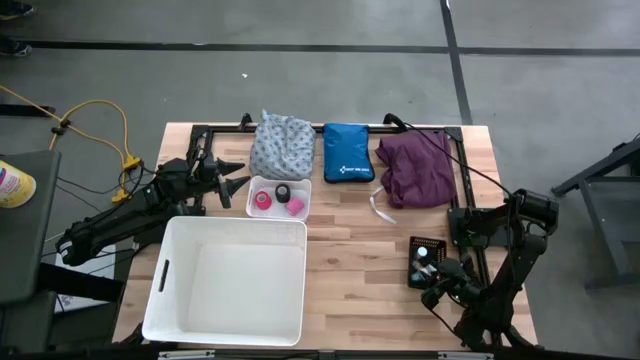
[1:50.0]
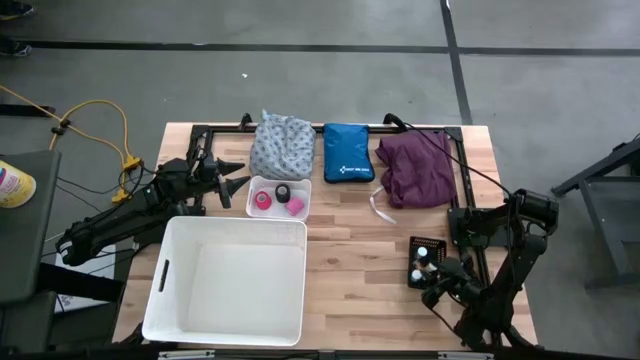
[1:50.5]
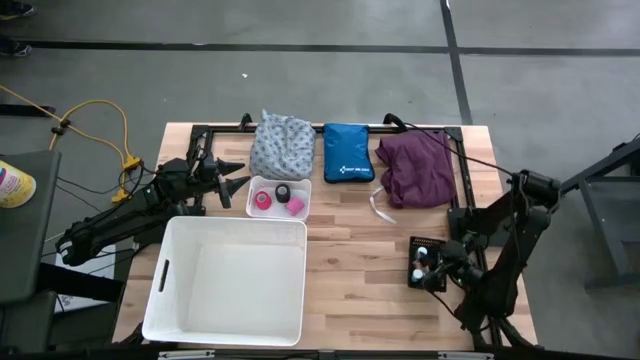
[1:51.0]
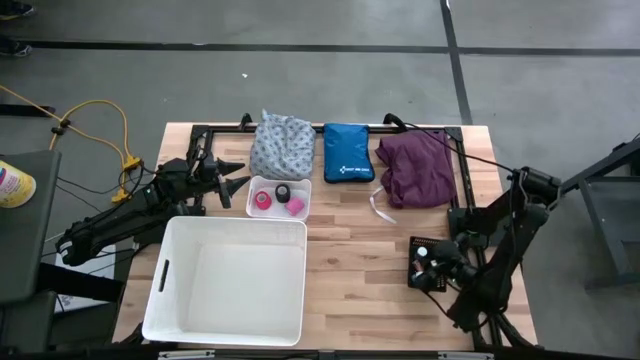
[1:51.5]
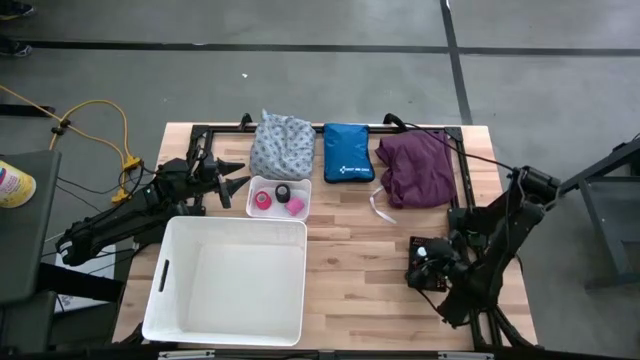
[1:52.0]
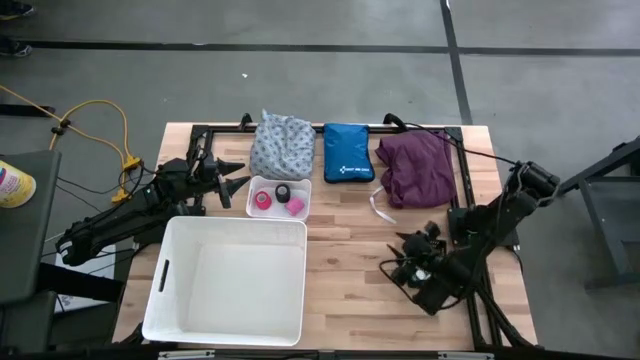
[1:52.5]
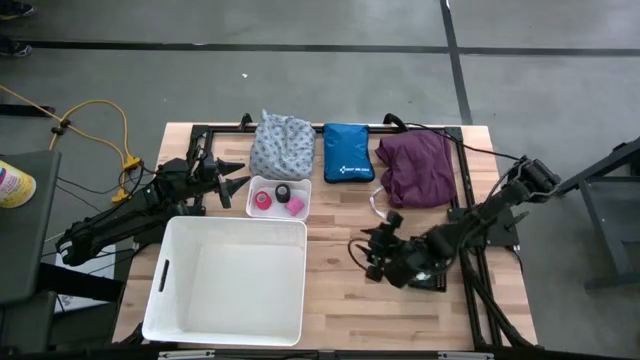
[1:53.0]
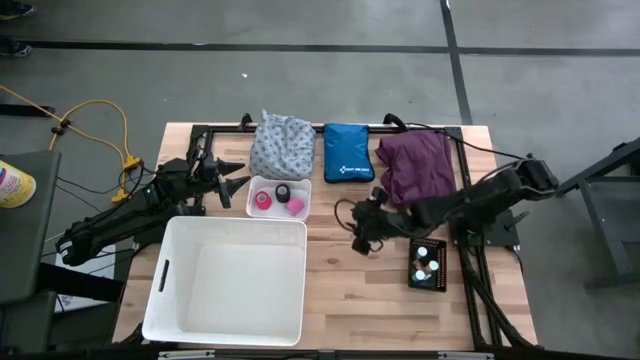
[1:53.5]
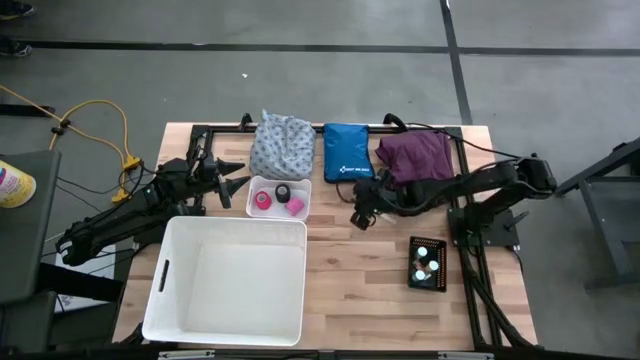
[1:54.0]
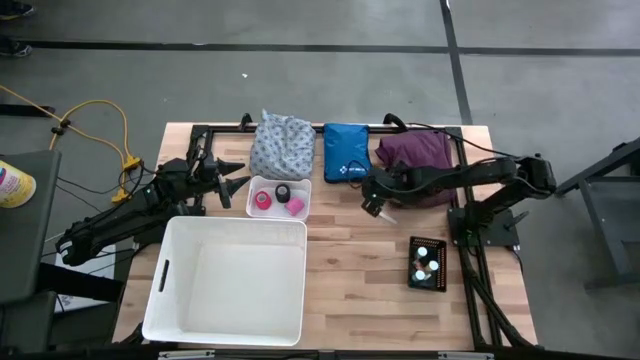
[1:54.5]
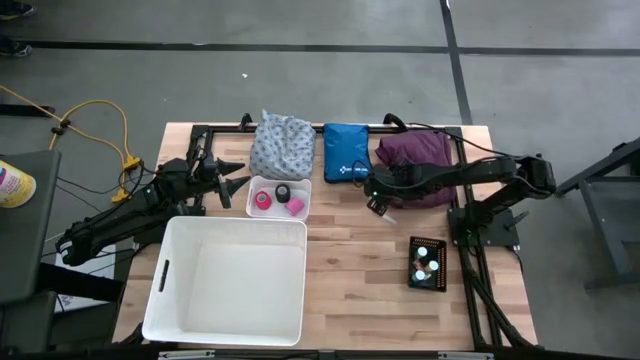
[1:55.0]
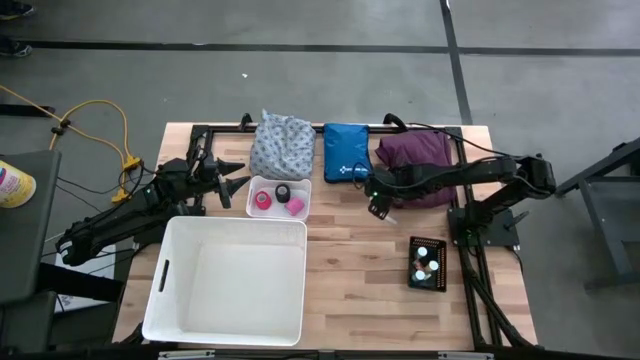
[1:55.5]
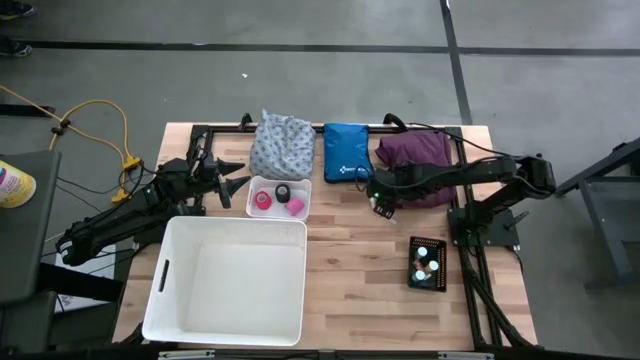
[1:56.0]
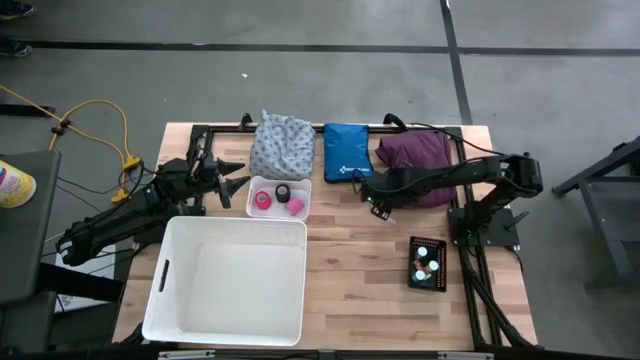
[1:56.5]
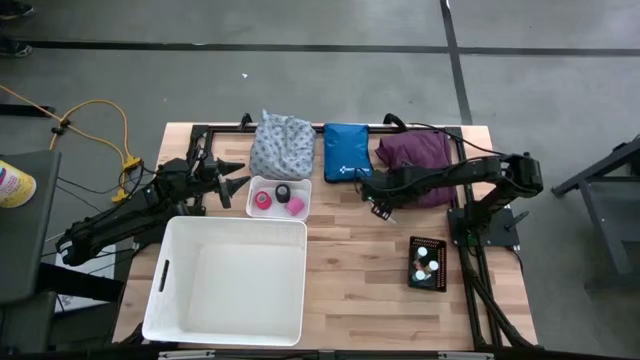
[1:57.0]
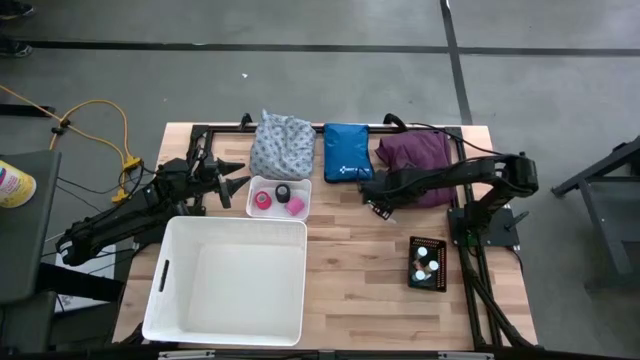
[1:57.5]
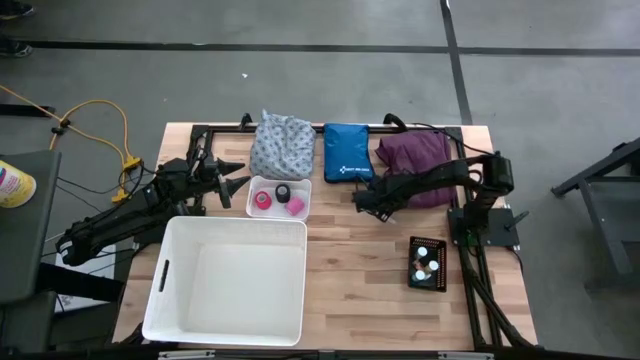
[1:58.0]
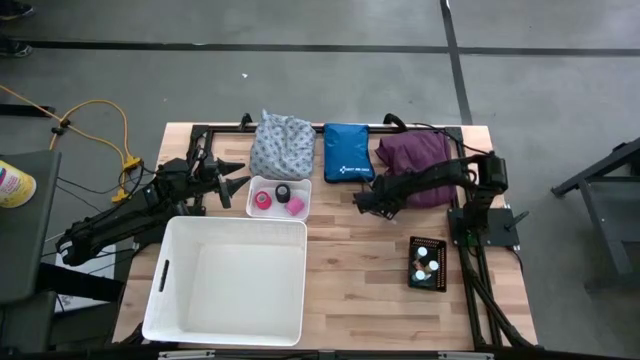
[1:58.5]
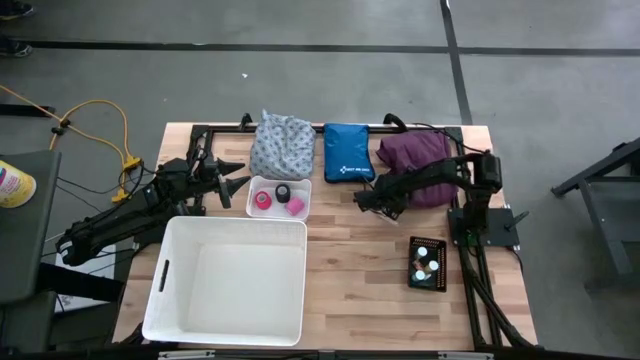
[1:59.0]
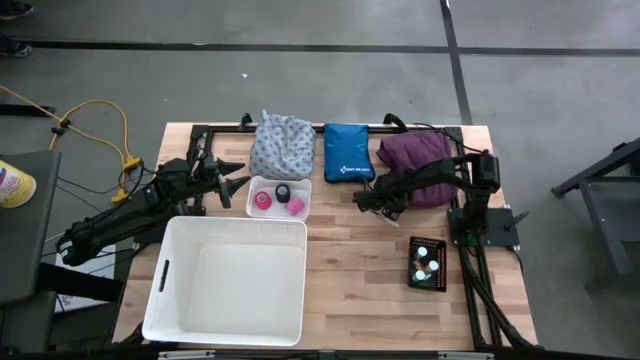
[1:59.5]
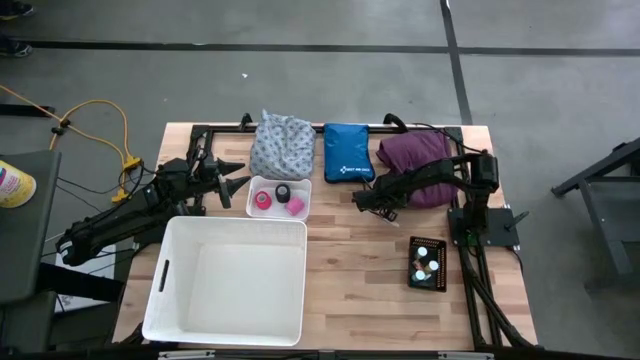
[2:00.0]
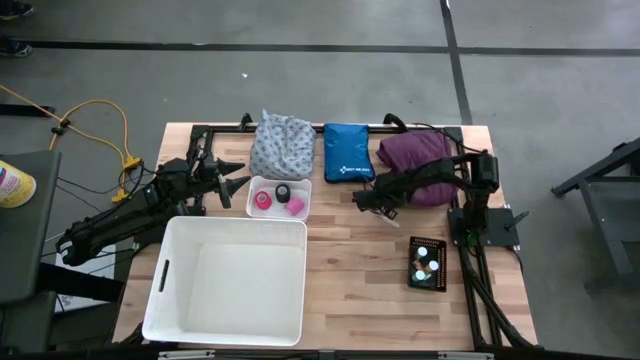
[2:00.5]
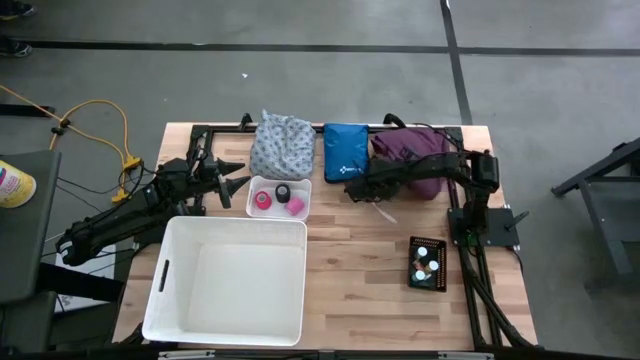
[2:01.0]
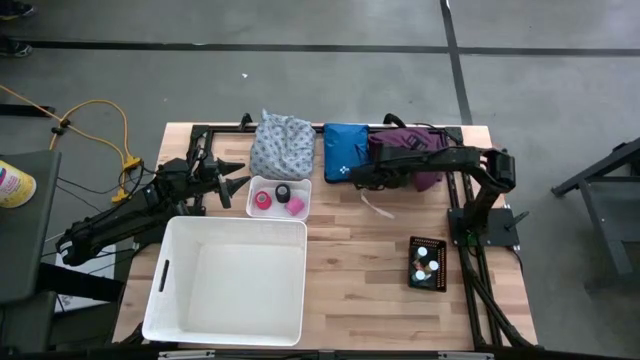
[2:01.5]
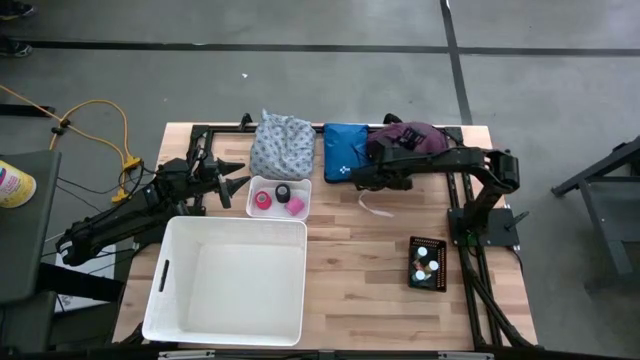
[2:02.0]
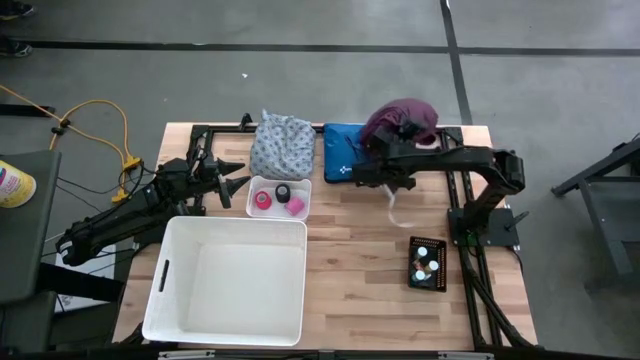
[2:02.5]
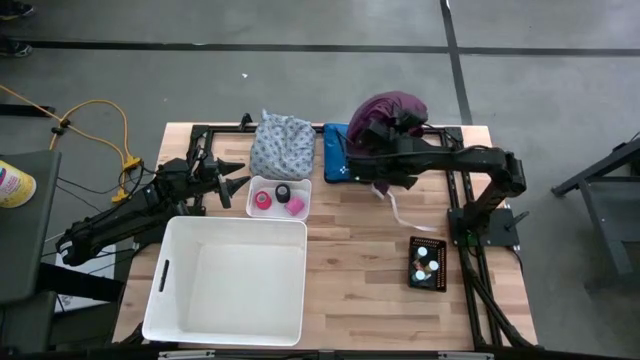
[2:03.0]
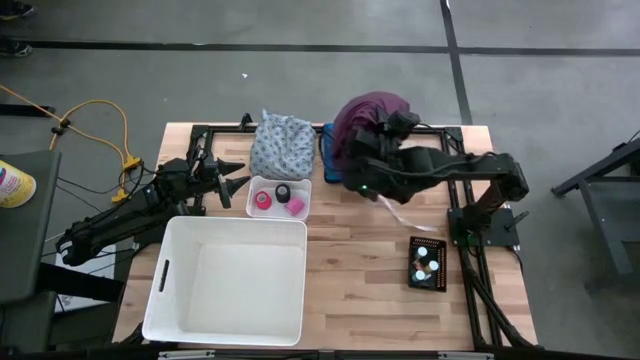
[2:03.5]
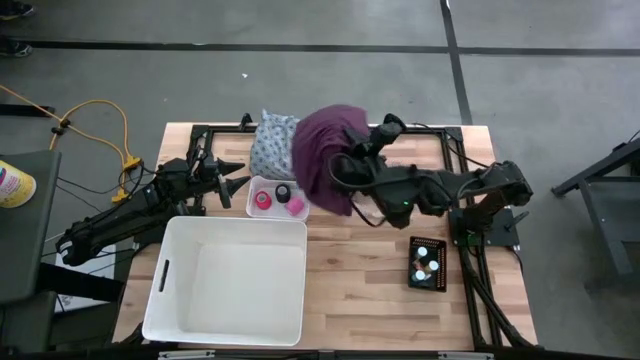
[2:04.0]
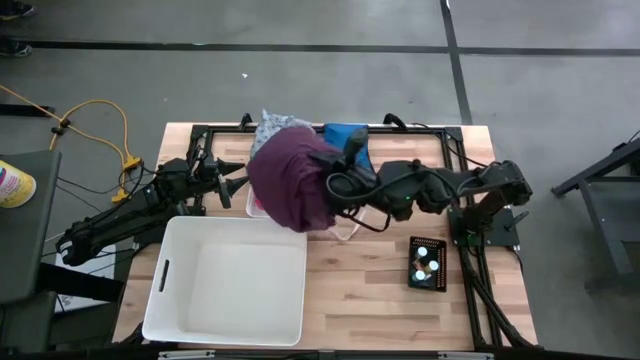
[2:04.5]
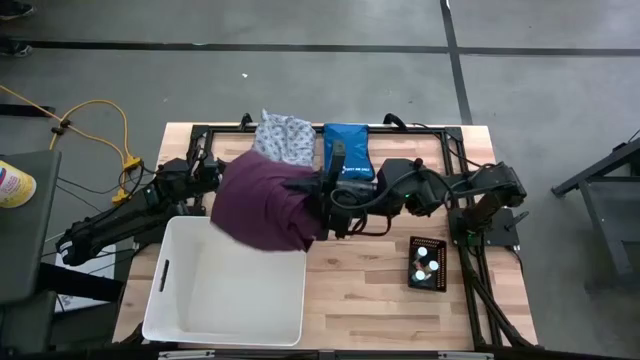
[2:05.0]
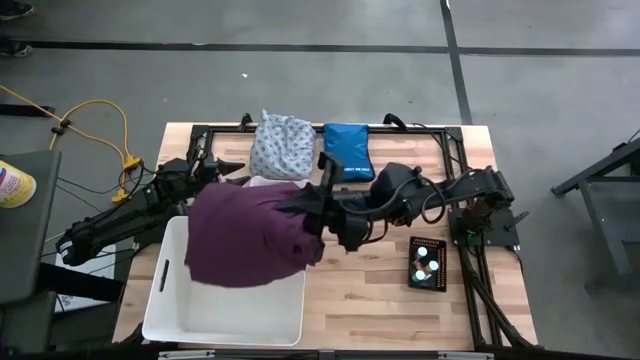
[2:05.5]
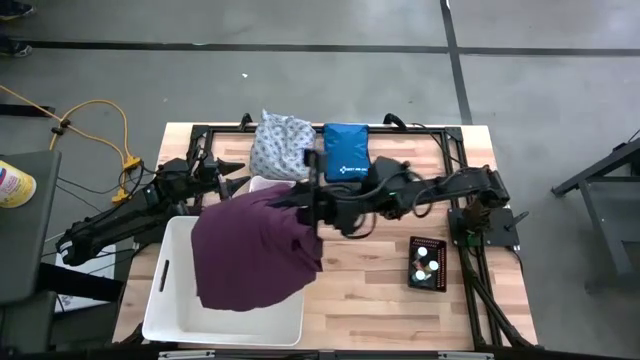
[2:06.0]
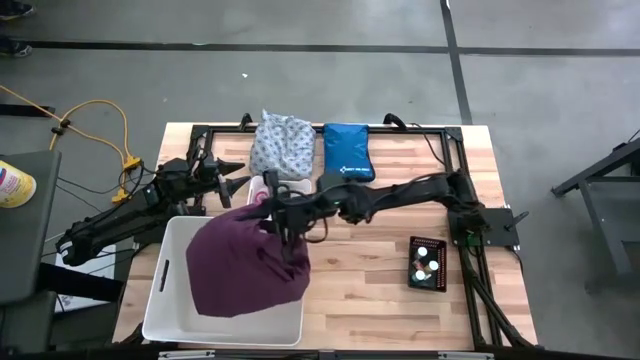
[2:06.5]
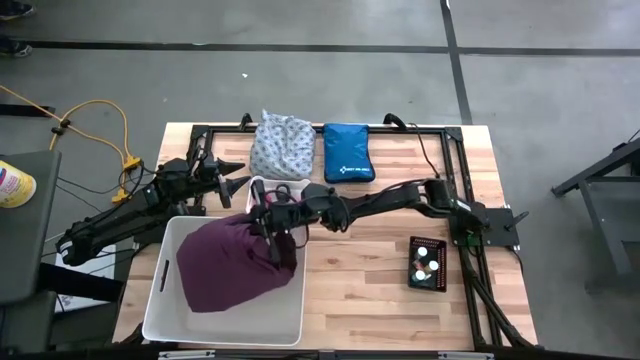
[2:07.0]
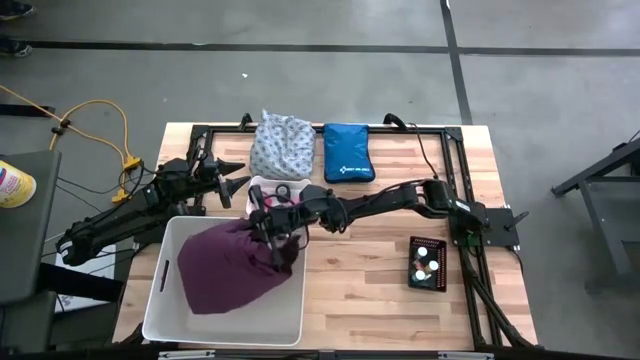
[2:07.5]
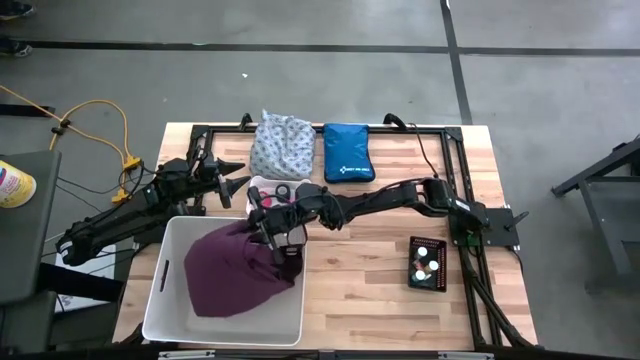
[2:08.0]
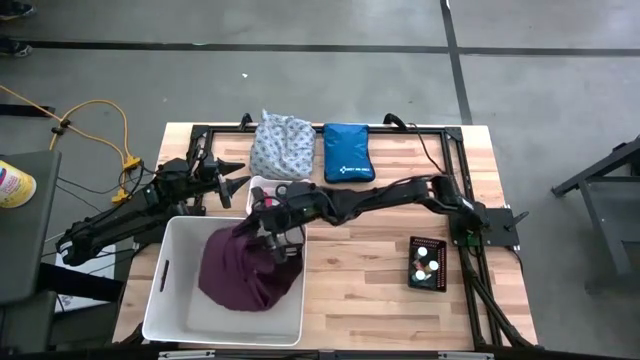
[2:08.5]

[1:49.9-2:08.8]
Task: Pick & place medical supplies in basket/bin
Put the violet patient gown into the white laundry organizer

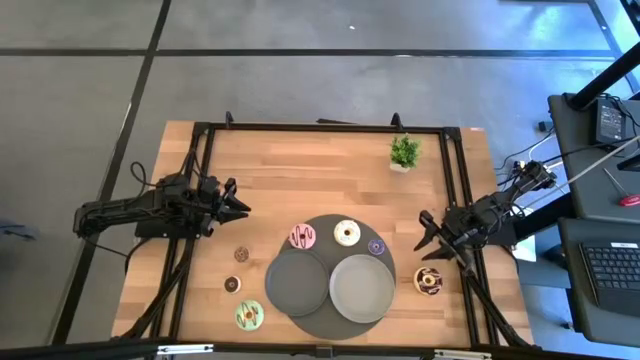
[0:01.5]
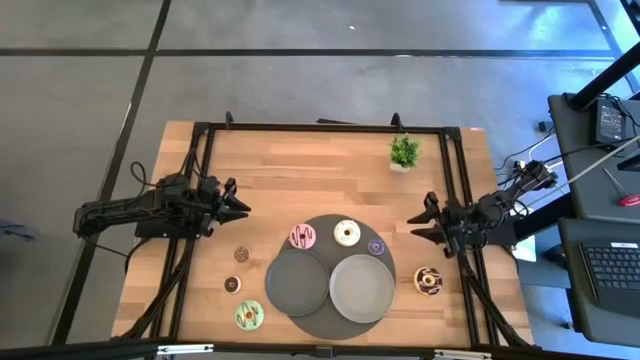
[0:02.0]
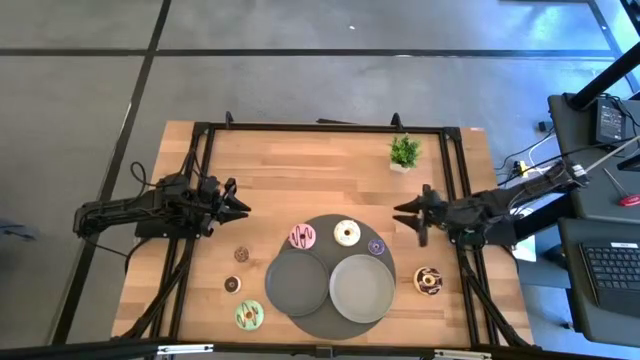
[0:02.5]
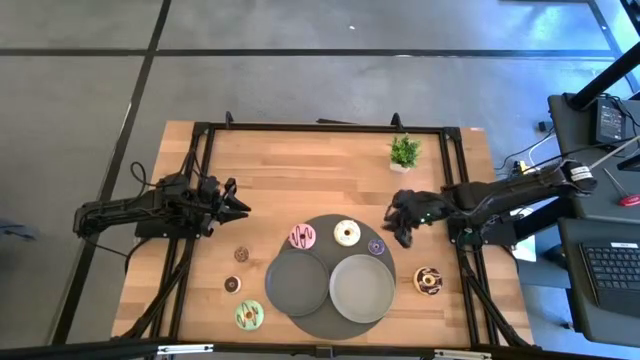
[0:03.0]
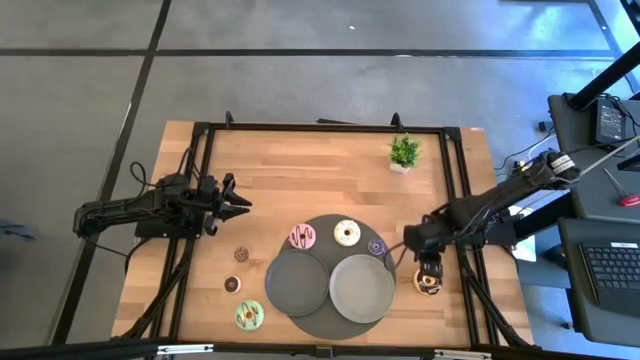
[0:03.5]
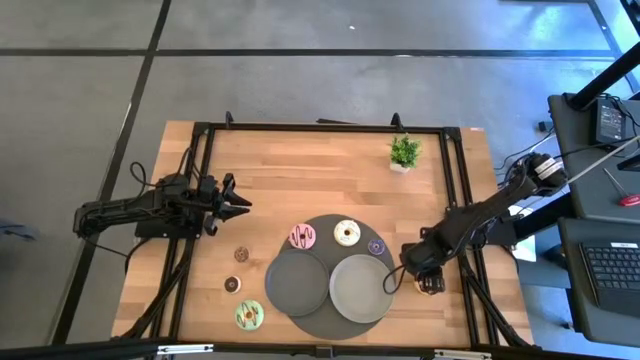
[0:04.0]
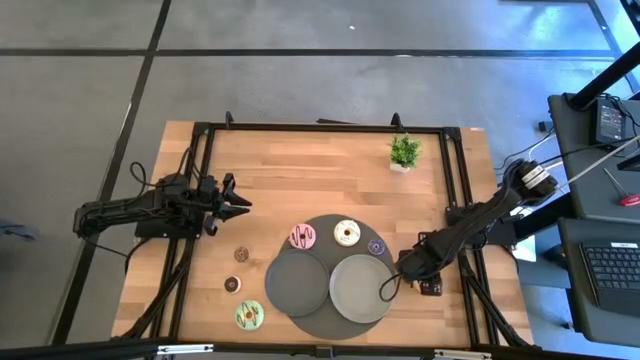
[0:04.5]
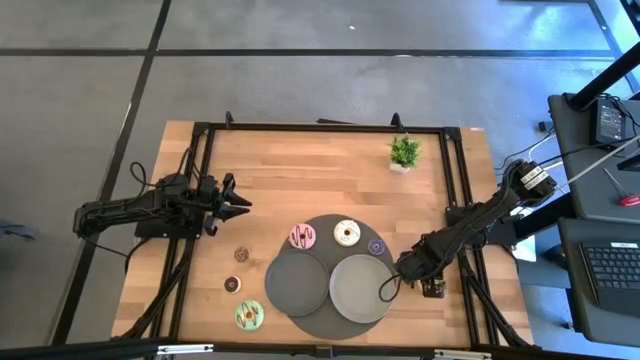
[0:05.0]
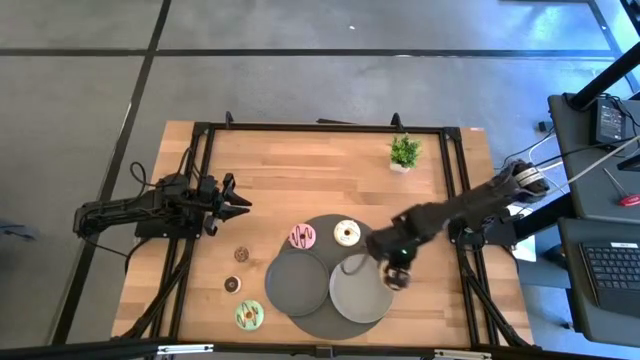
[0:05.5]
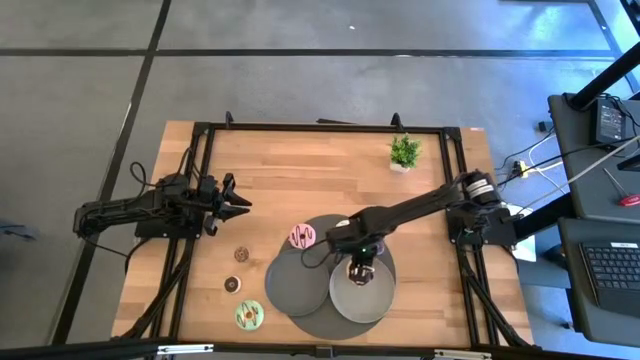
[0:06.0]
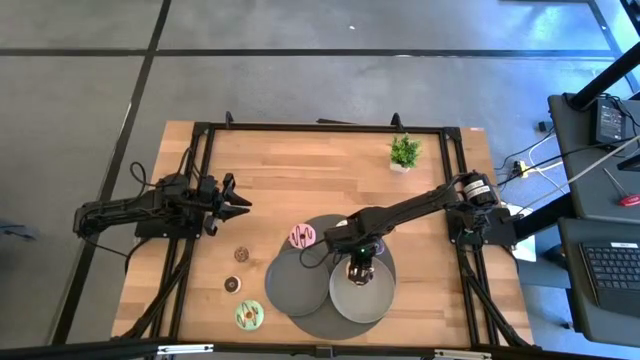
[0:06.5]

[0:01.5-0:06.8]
Task: Pick & Place donuts
Put the large black donut on the gray plate
